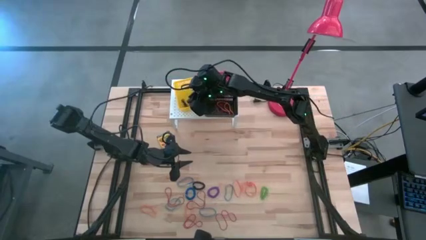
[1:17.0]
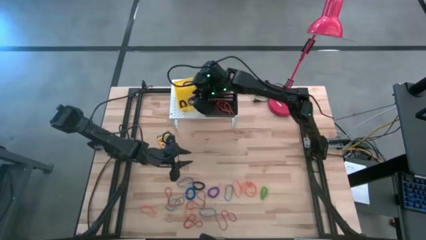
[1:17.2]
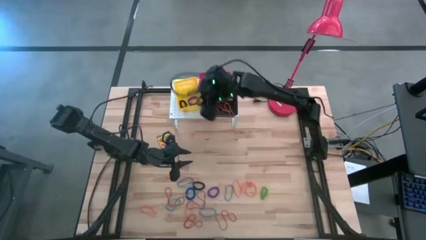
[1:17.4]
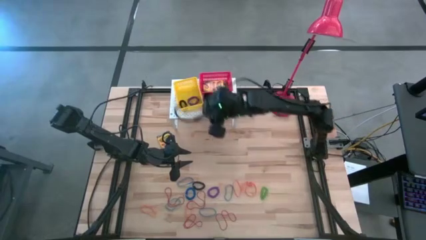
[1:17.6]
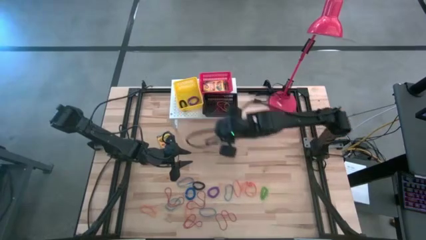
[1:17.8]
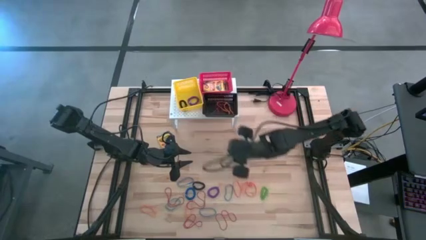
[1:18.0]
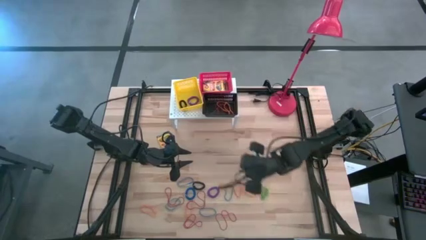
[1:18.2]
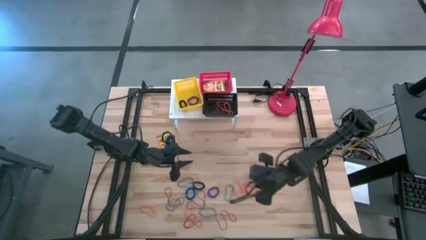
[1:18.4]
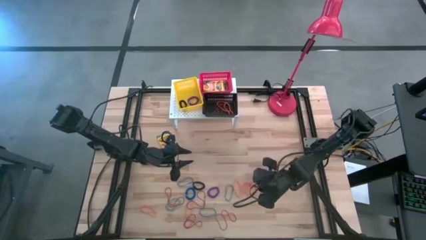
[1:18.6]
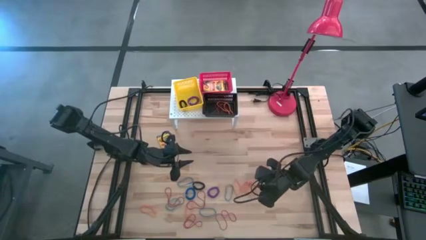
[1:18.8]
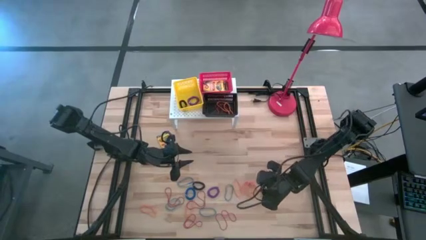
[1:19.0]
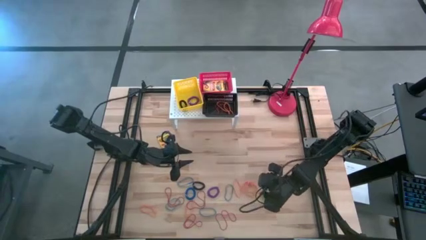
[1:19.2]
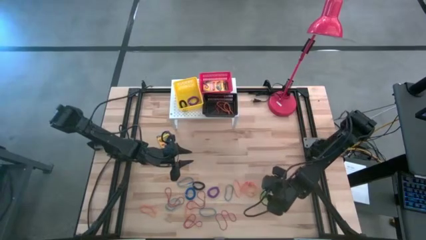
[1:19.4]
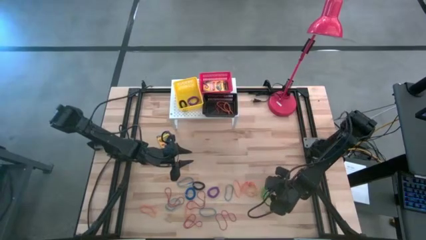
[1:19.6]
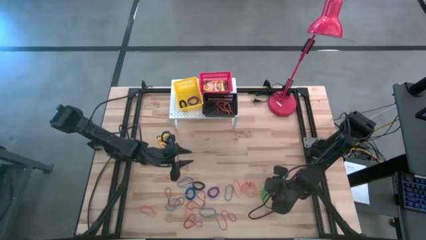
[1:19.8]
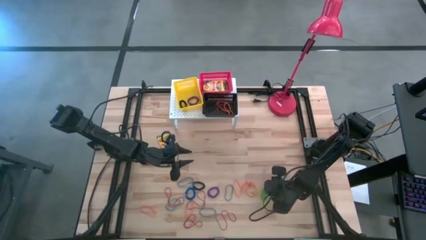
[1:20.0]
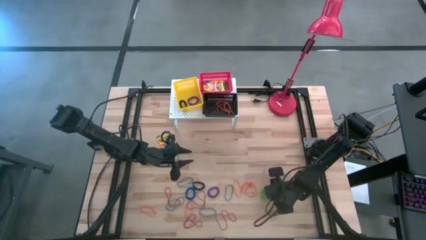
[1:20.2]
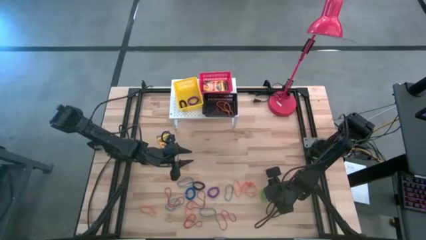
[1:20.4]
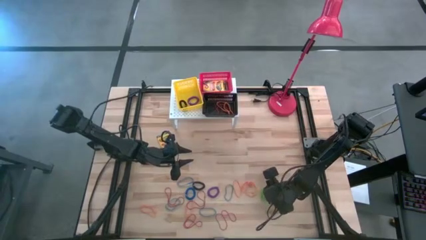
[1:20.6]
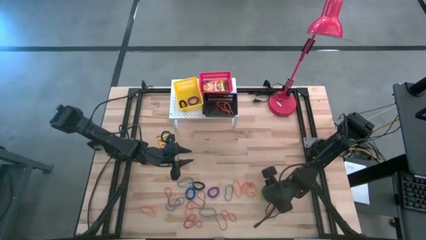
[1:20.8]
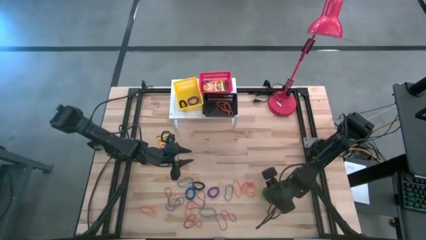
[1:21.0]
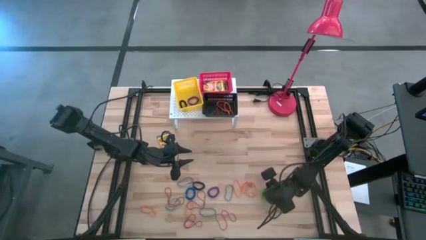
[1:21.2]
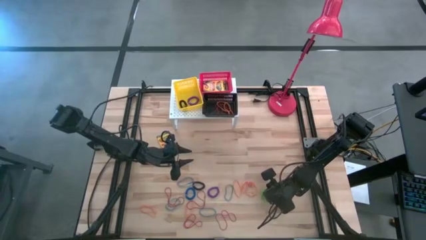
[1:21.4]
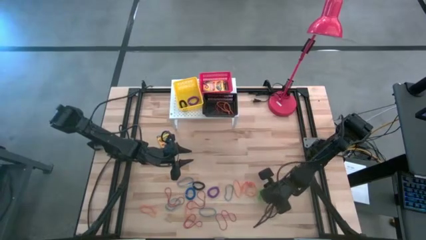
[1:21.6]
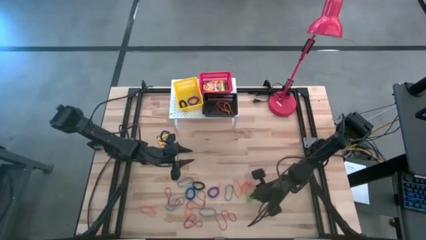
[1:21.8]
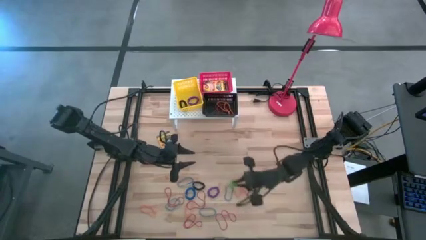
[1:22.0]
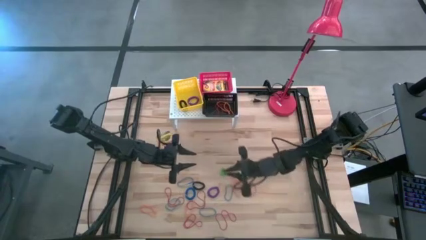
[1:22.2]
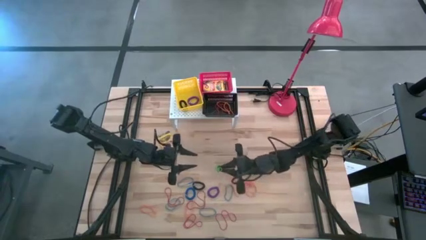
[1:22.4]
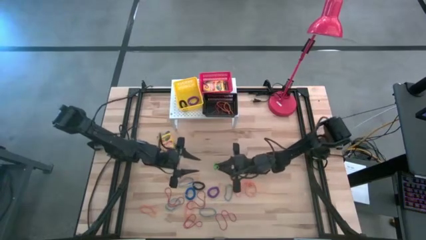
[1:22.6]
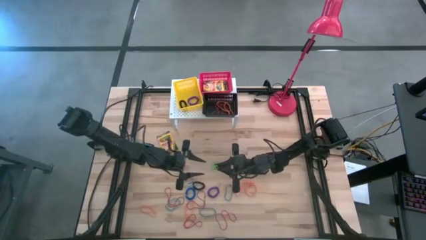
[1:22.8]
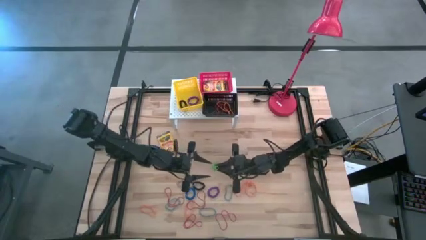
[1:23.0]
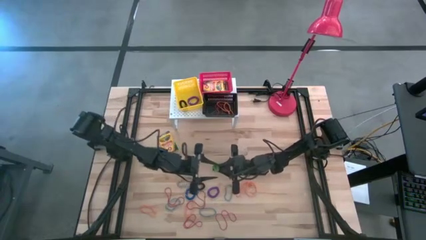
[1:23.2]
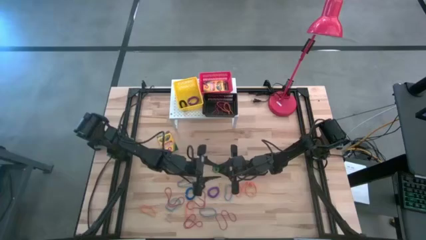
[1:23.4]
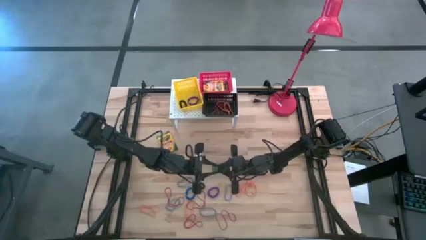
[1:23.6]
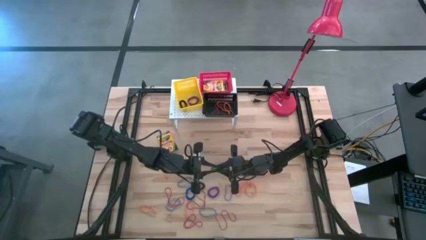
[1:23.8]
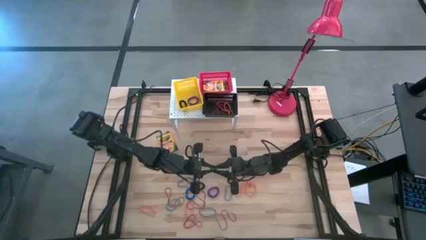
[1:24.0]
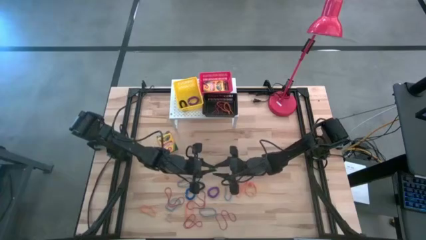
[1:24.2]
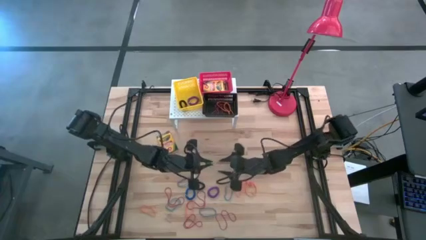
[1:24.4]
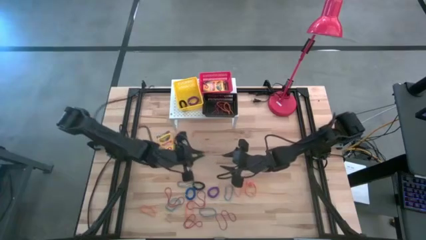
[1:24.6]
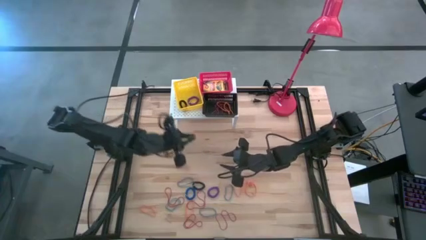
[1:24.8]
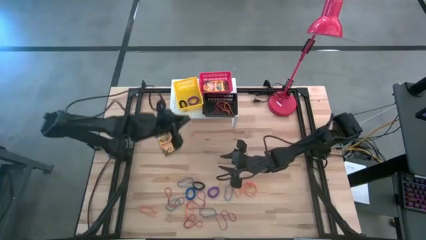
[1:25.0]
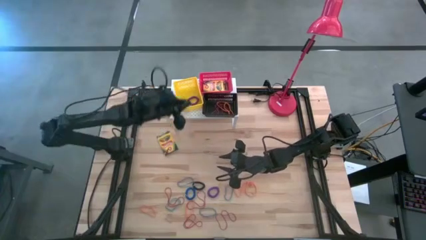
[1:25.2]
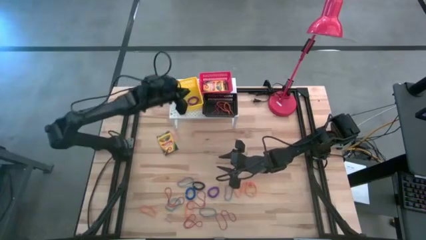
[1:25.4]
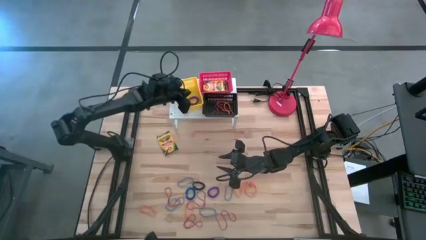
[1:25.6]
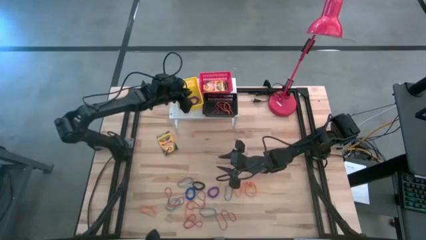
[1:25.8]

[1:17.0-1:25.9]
Task: Pick & Place Office Desk Supplies
Put the green spring keychain into the yellow bin on the shelf

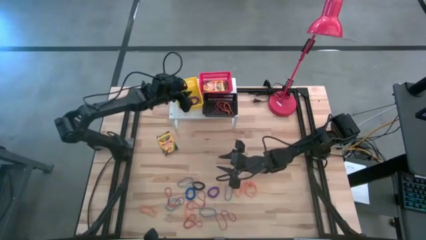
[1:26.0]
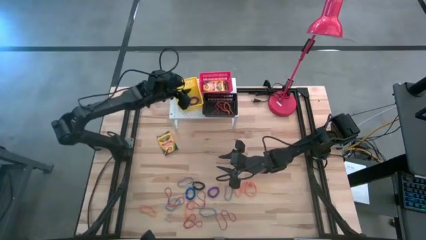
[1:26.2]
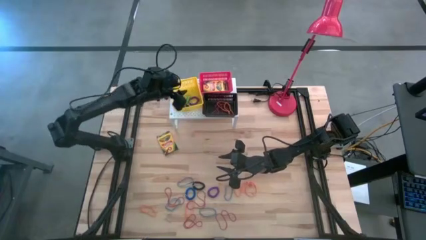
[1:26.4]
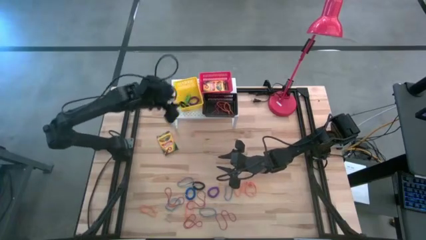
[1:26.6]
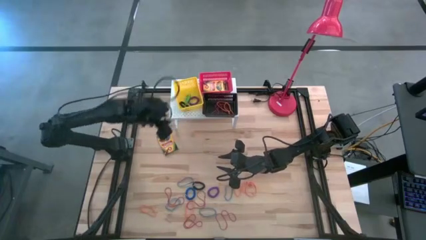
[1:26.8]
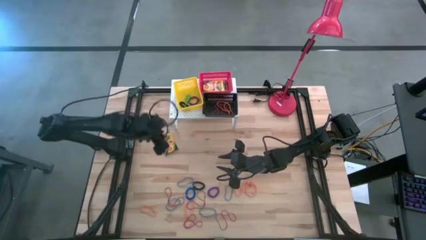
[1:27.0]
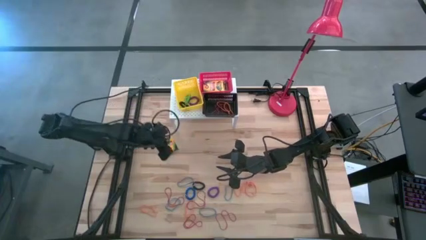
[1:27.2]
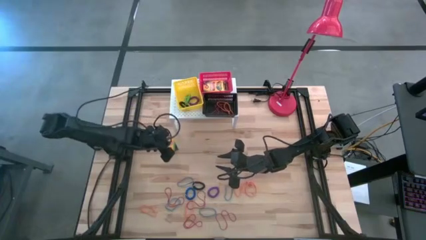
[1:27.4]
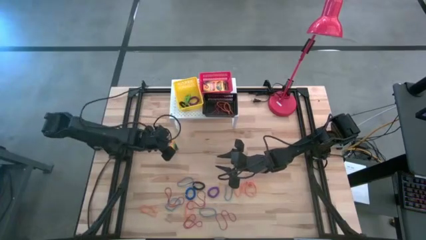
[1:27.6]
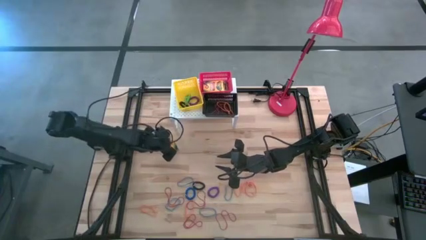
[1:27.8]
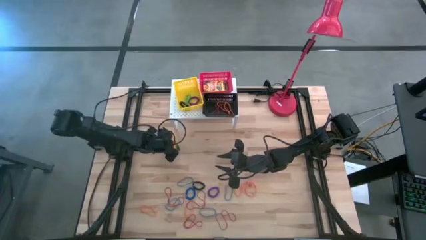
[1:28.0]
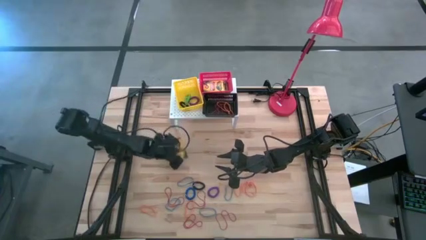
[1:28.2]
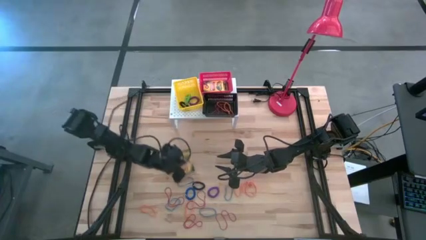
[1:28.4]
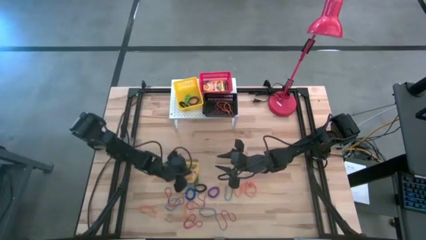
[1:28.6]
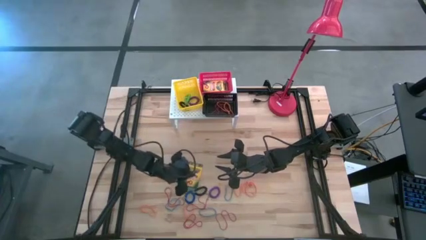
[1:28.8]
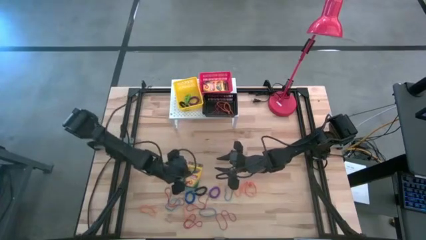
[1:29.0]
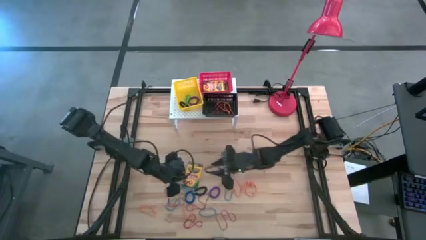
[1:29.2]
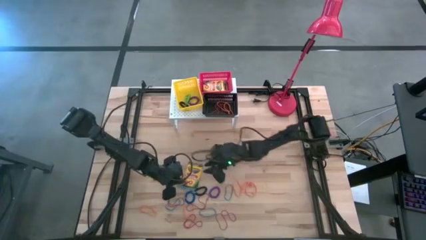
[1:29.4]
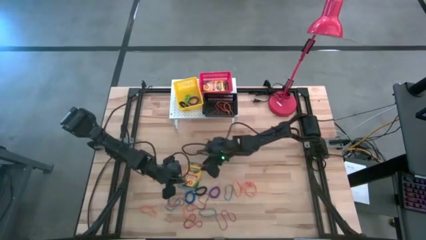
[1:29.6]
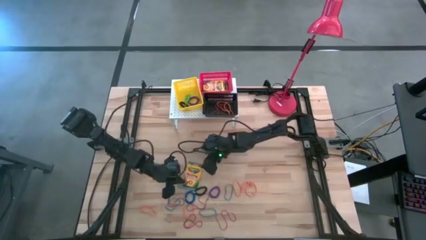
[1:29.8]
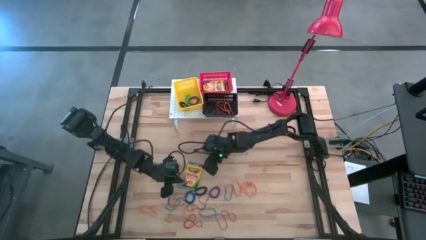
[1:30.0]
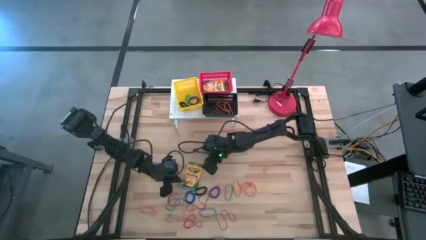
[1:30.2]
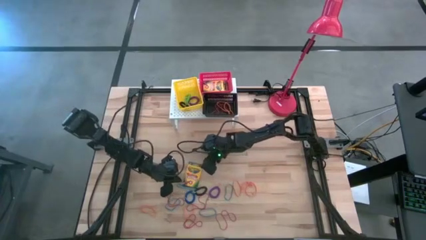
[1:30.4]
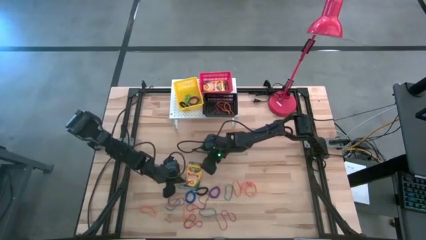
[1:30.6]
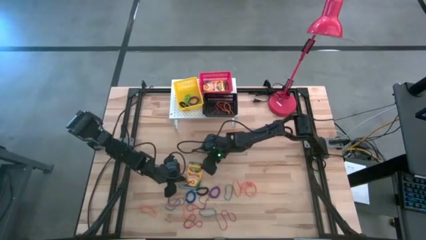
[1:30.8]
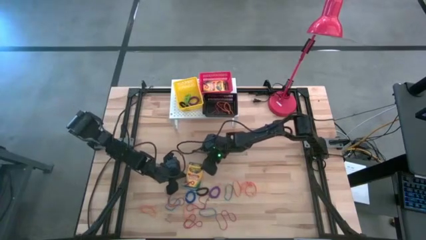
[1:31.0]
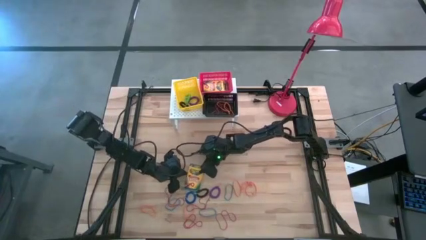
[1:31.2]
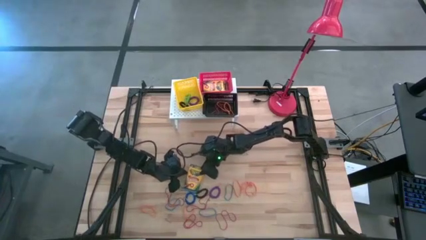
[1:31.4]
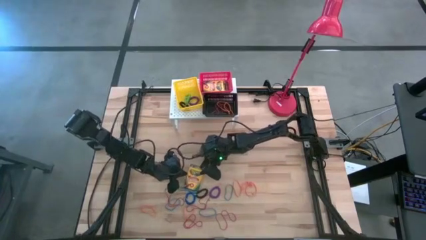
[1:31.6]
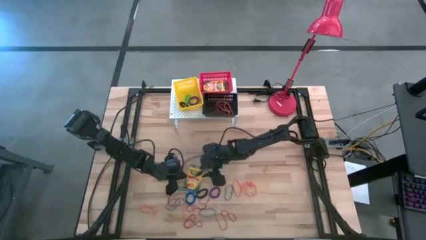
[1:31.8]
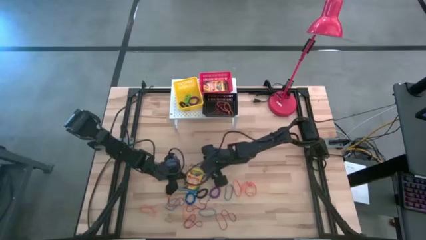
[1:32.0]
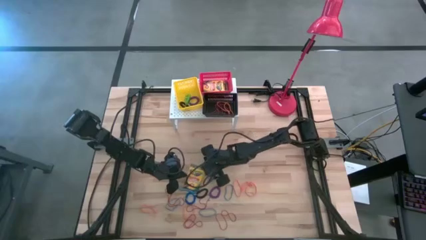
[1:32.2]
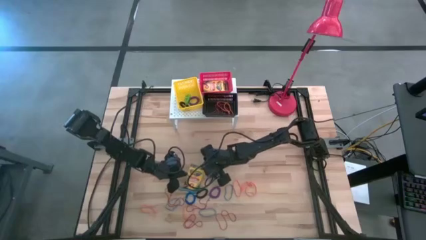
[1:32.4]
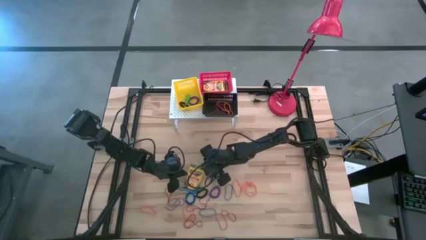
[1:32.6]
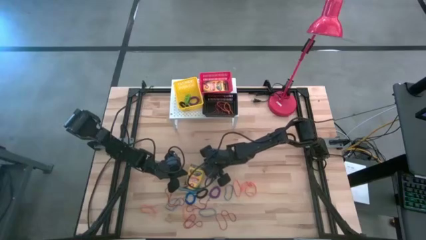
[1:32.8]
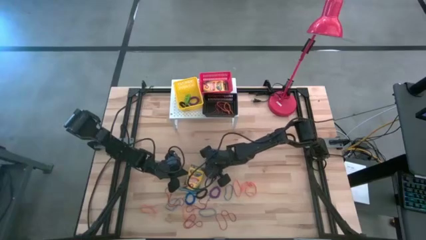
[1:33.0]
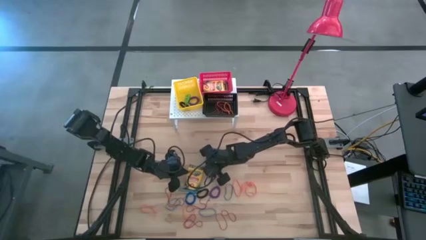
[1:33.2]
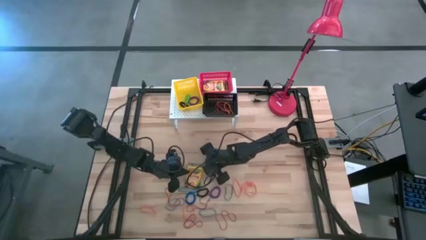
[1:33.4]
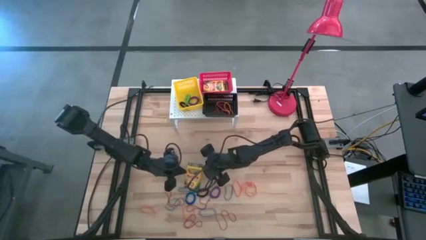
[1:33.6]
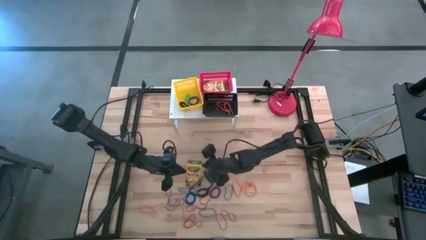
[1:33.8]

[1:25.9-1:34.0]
Put the yellow crayon box into the red bin on the shelf
